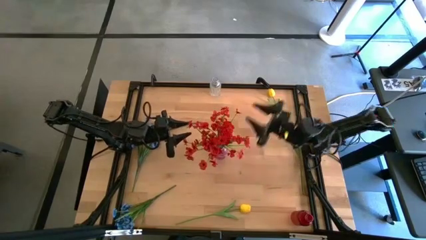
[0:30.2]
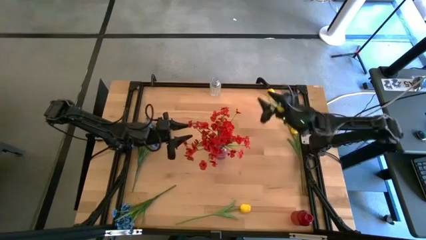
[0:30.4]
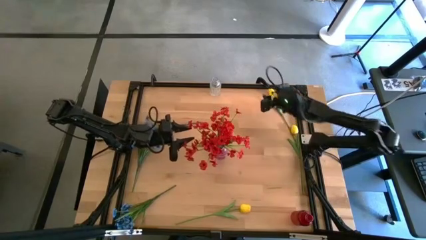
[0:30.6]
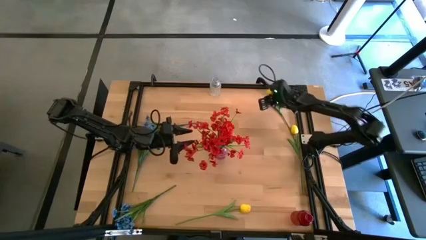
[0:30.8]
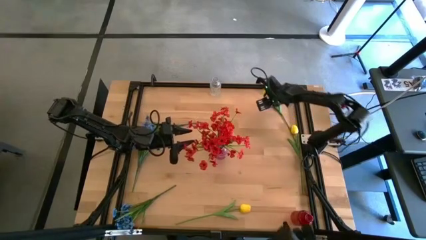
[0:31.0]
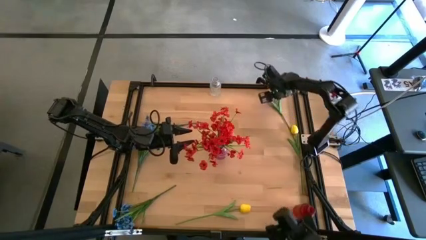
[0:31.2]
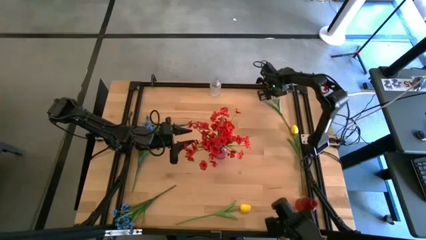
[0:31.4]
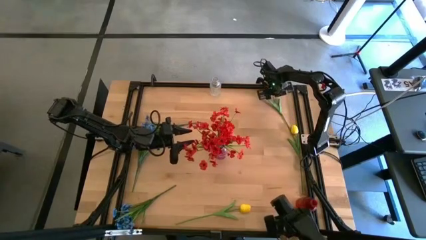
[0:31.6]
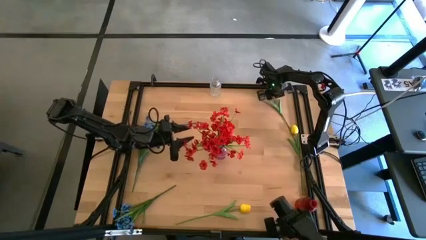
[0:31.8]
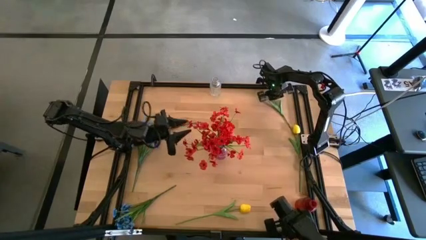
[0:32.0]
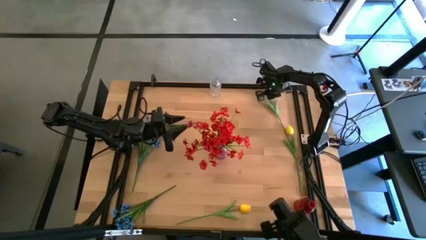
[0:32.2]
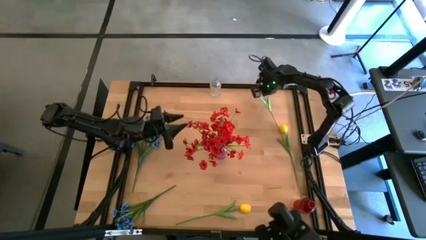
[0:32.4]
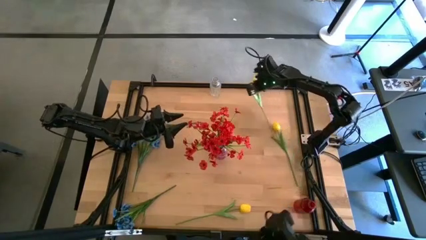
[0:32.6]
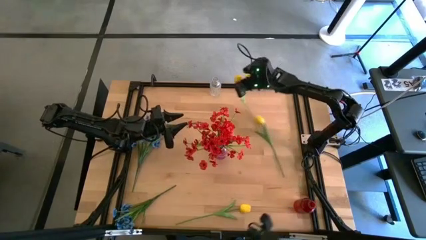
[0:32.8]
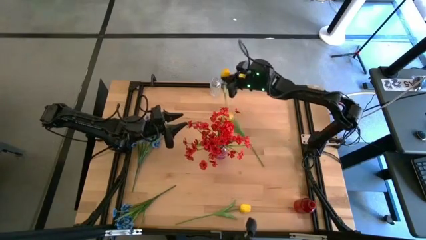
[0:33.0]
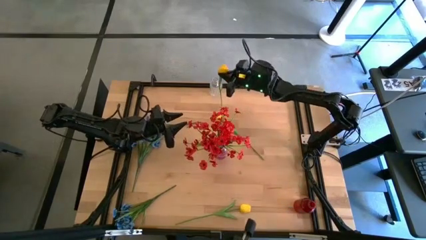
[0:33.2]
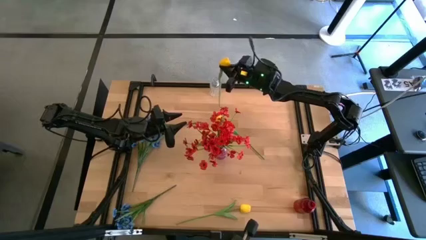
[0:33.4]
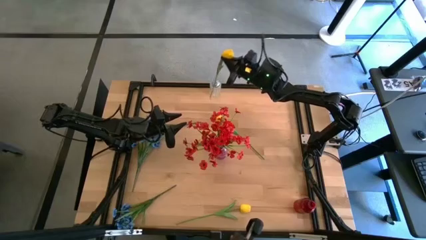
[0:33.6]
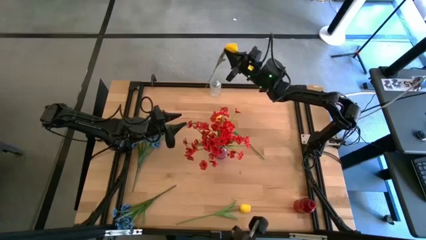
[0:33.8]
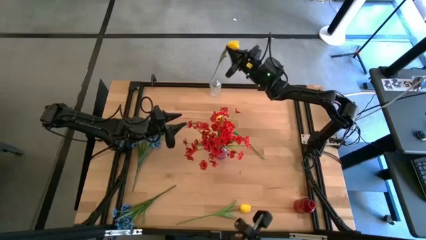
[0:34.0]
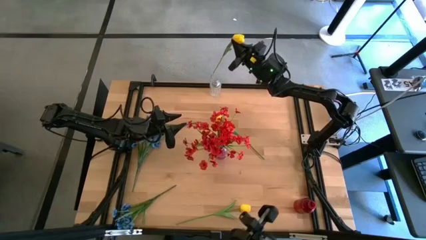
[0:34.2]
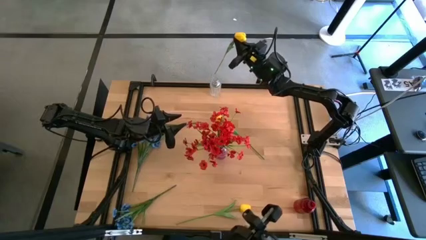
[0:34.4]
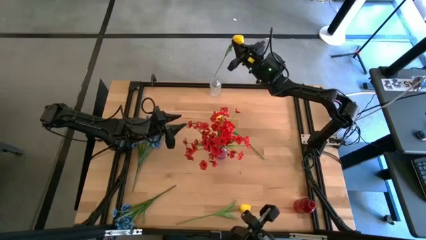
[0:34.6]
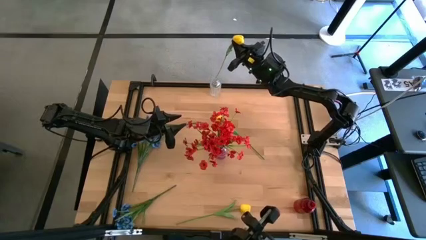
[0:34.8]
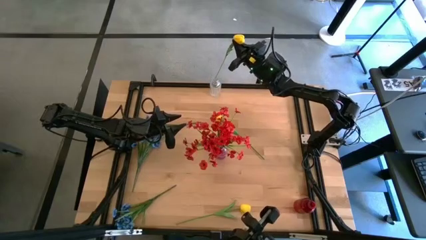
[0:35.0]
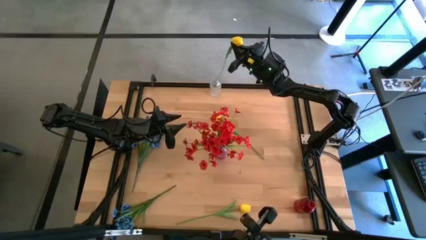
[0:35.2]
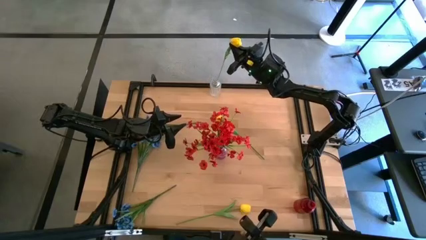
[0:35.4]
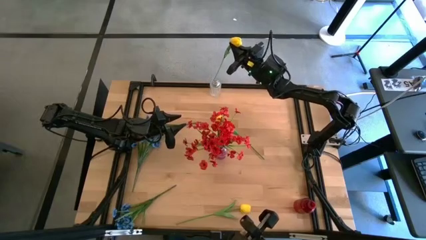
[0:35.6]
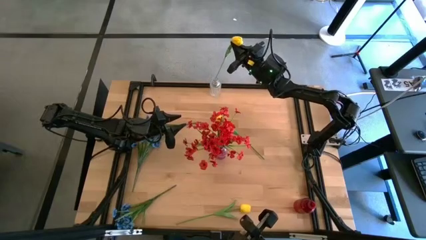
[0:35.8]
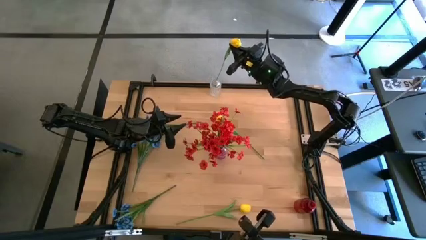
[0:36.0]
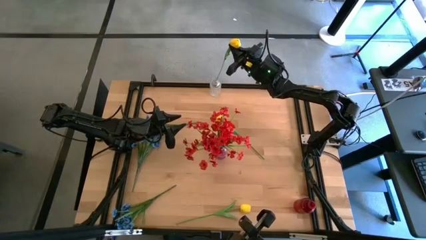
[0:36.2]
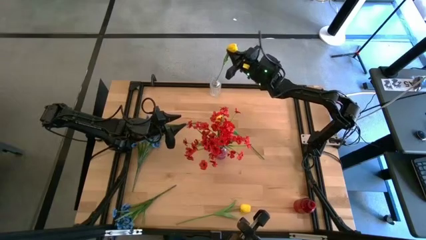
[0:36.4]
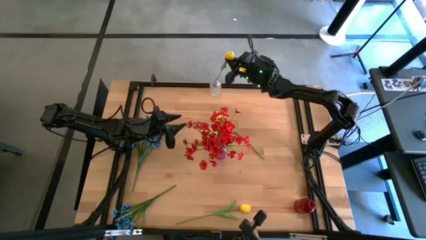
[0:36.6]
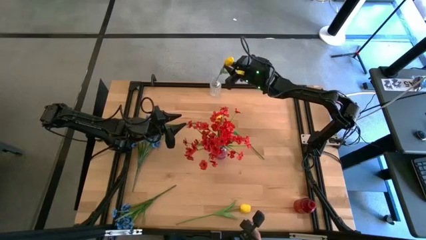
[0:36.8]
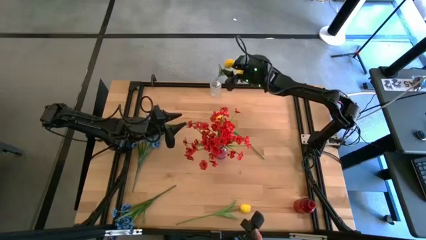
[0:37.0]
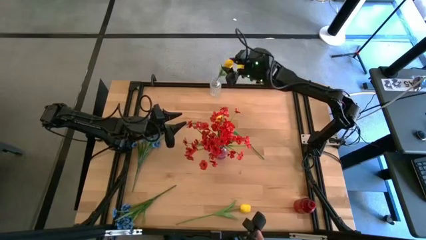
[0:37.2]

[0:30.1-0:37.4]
Task: Sort flowers into vase by color
Put the top yellow tulip into the transparent vase

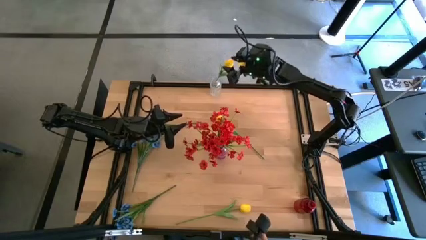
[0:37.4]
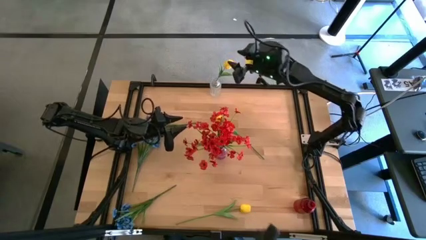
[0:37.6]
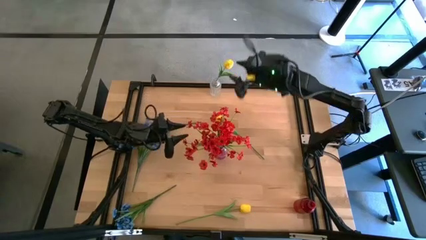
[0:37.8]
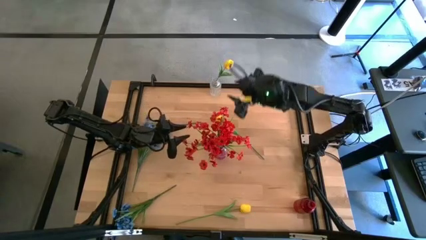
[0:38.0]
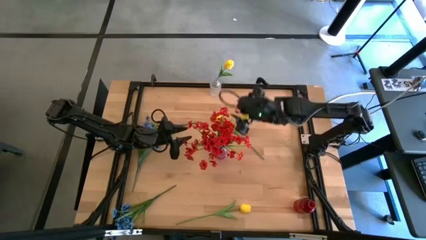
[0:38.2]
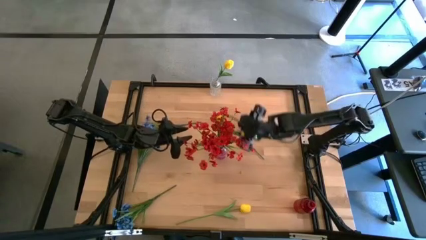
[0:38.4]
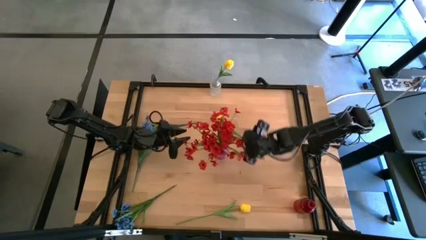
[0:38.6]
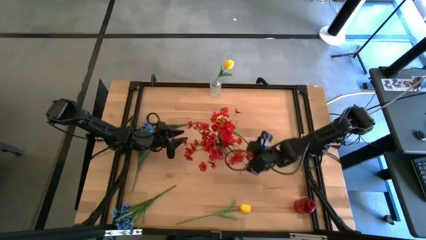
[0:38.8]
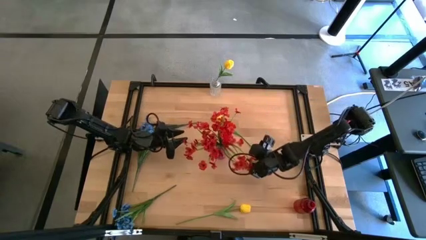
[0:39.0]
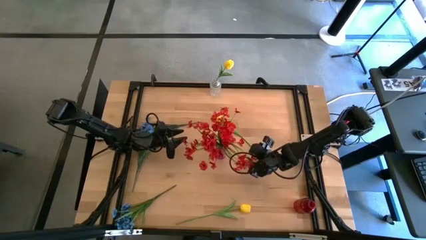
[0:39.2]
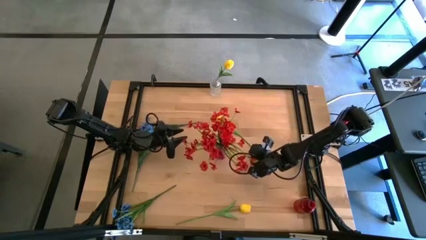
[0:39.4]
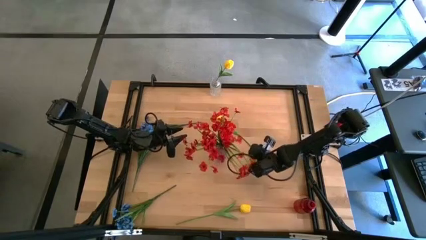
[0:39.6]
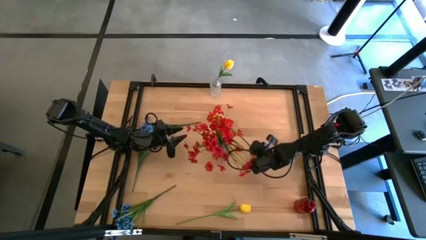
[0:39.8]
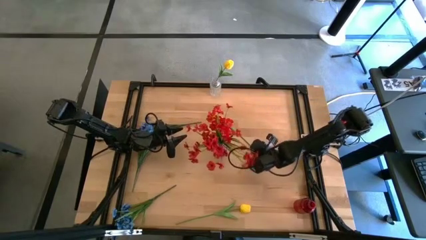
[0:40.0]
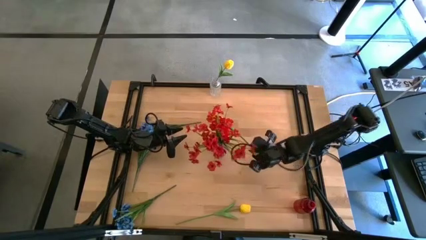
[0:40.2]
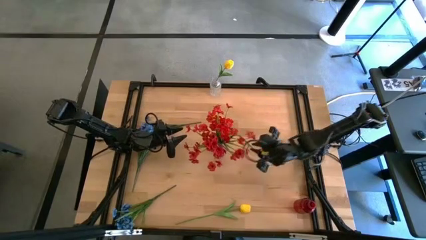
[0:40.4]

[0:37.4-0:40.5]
Put the top yellow tulip into the transparent vase

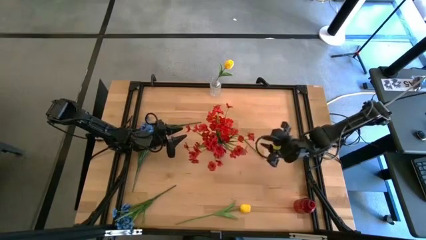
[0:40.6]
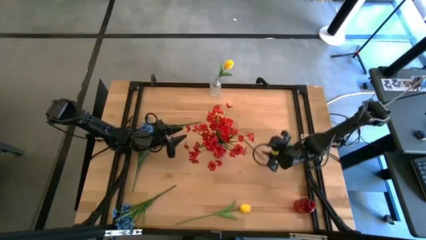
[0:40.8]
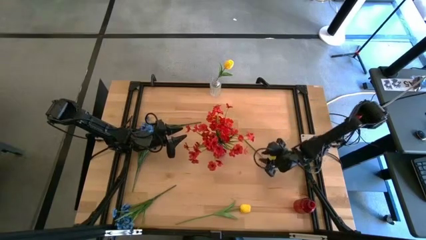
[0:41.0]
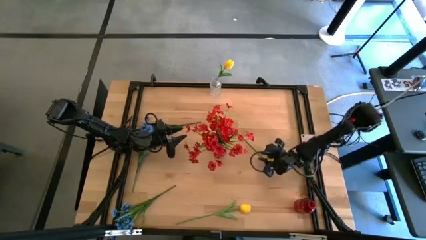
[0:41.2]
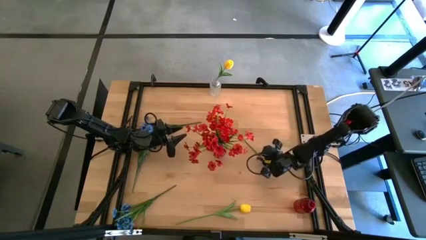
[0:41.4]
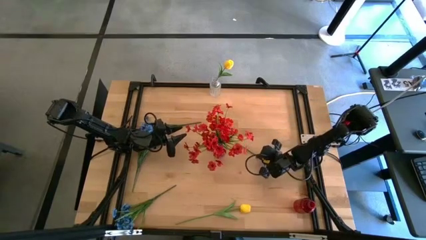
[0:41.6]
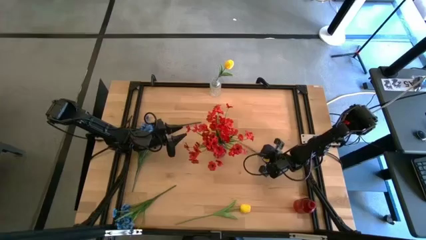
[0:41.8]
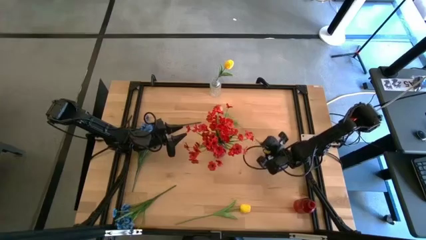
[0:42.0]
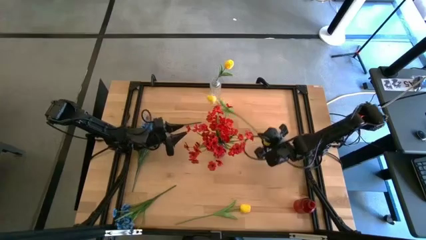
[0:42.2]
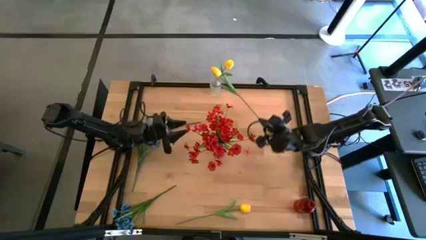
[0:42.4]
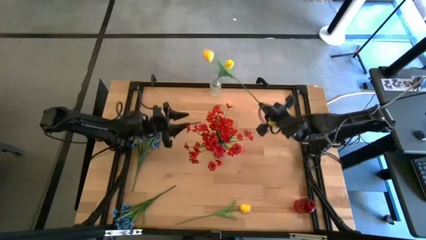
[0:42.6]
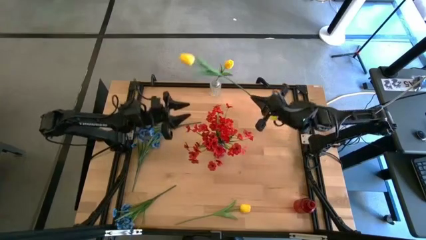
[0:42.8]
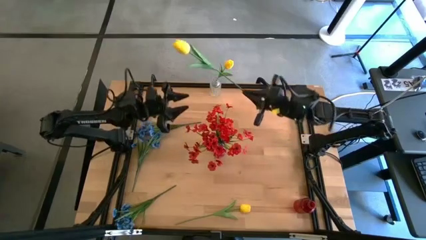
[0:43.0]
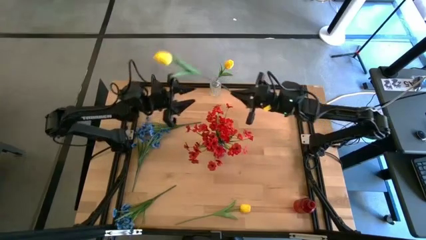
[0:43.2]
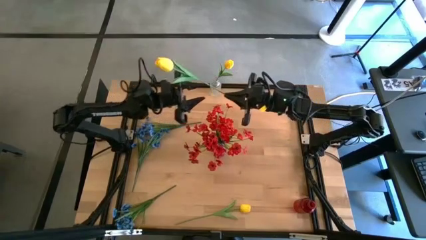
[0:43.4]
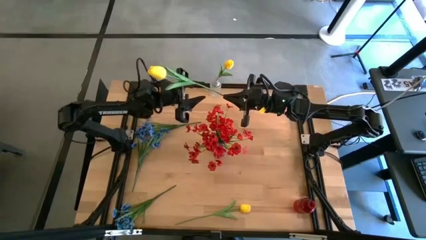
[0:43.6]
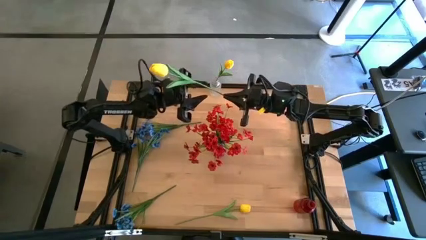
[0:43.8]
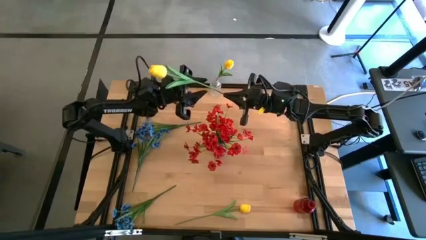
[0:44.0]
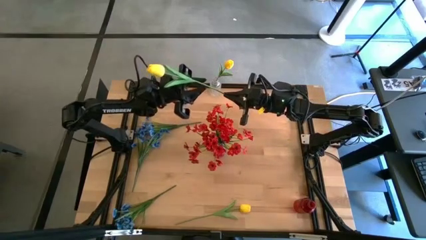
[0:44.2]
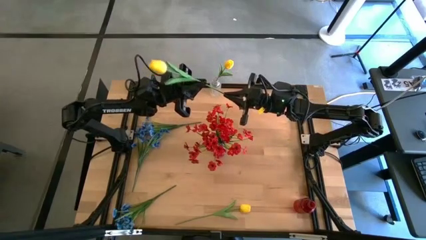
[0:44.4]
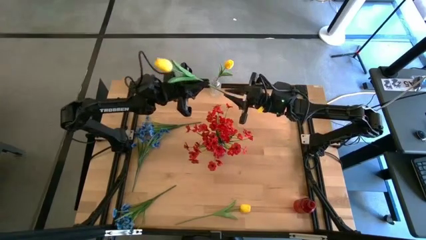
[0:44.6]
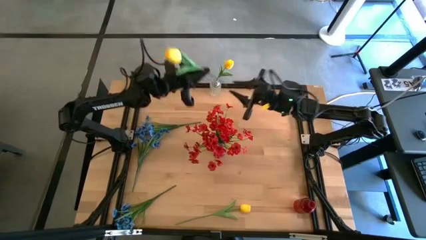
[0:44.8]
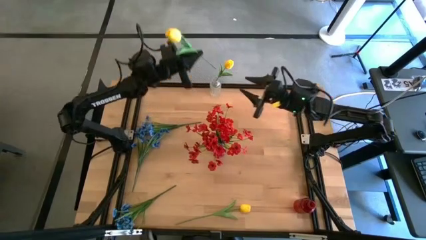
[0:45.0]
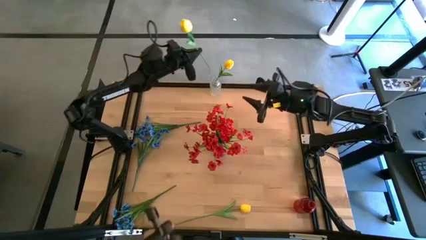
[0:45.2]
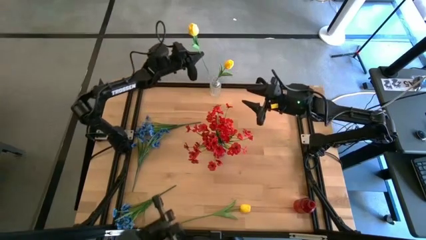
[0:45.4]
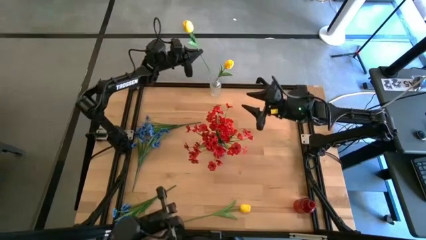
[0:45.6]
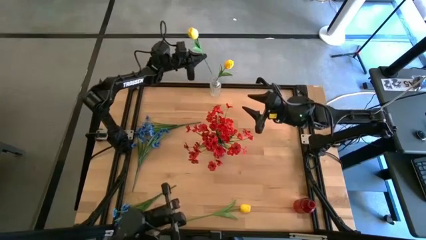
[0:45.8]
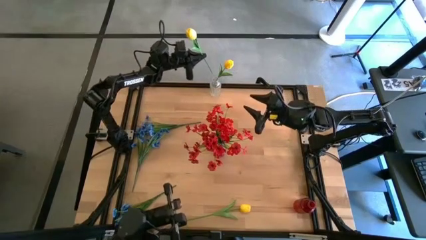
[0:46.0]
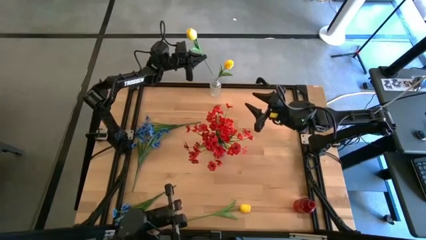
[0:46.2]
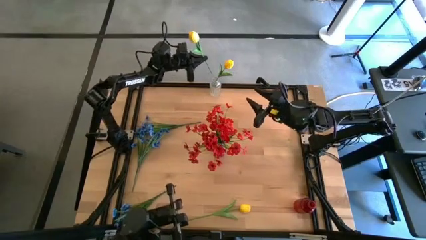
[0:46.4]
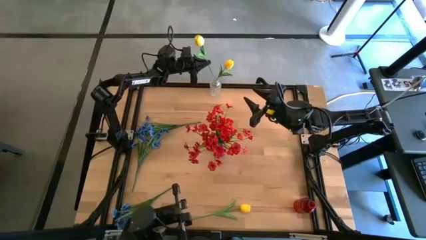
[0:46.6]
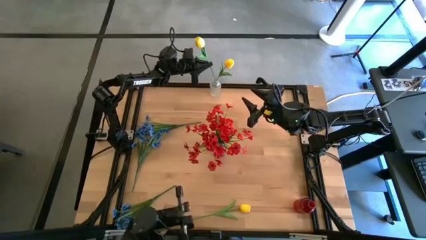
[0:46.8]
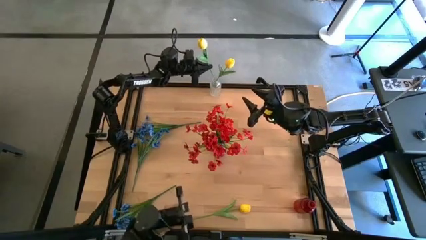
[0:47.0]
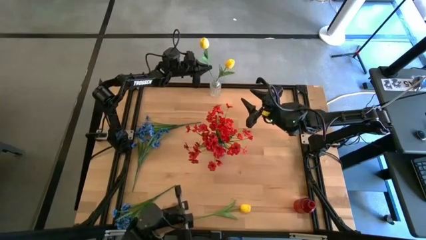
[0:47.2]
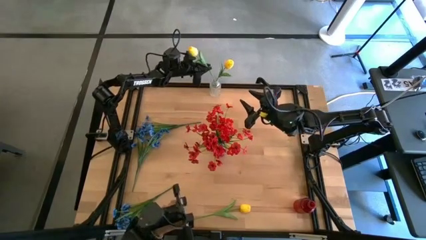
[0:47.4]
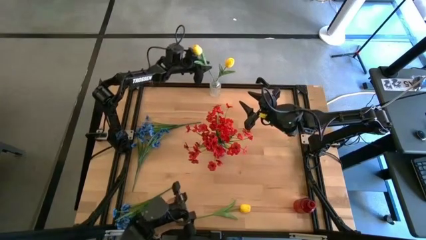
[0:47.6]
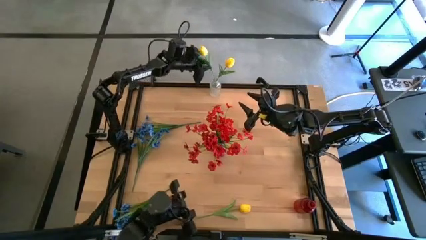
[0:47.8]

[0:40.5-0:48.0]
Put the top yellow tulip into the transparent vase
